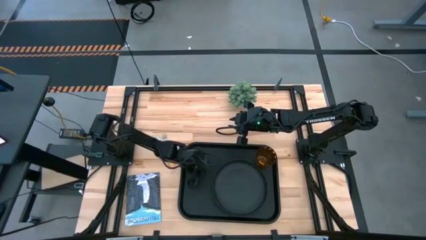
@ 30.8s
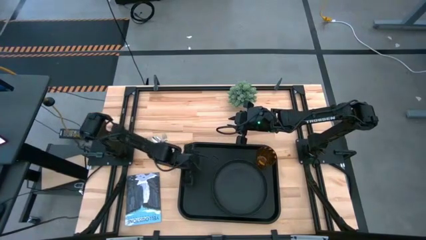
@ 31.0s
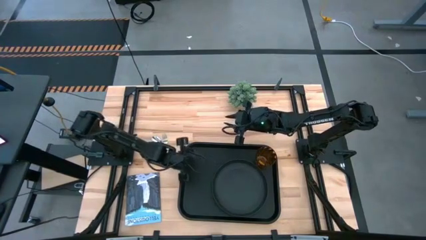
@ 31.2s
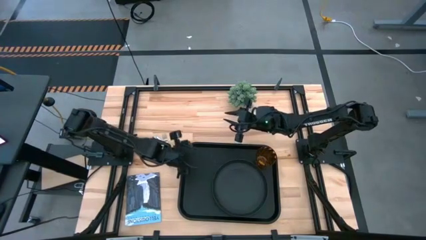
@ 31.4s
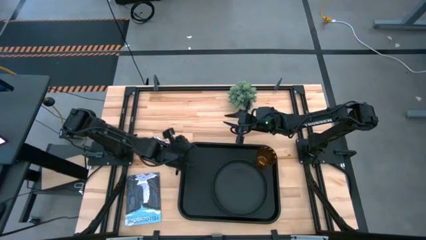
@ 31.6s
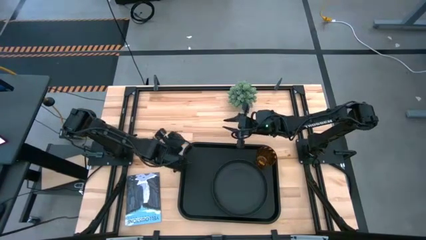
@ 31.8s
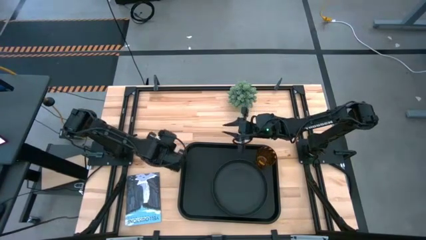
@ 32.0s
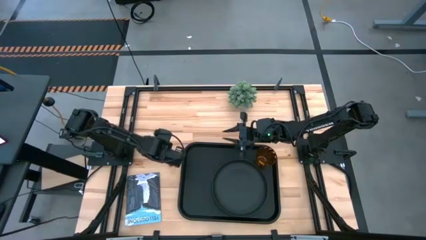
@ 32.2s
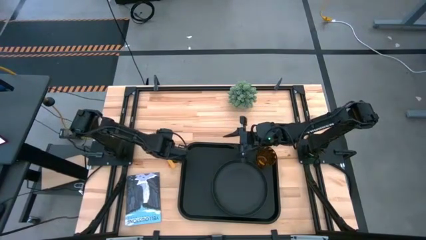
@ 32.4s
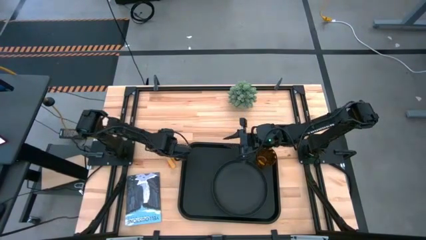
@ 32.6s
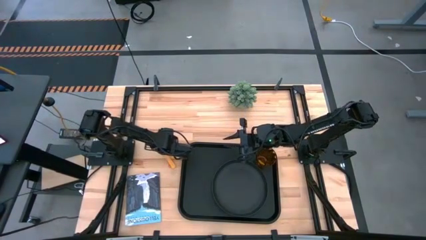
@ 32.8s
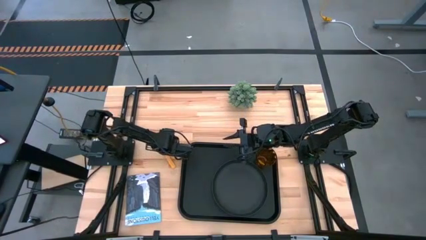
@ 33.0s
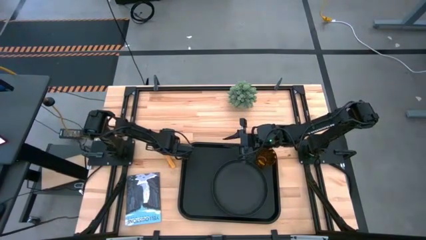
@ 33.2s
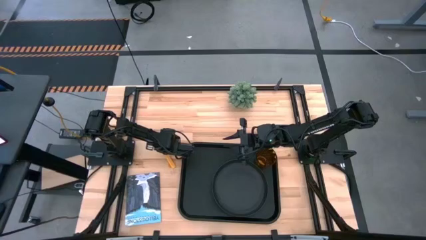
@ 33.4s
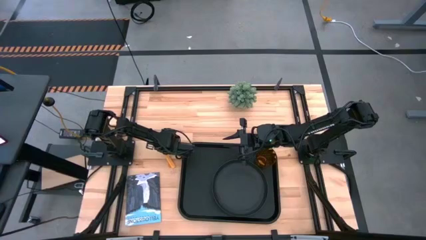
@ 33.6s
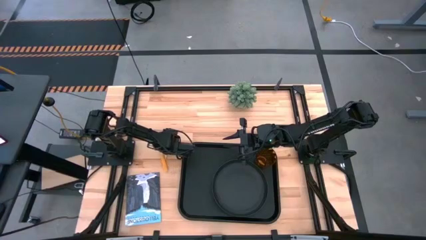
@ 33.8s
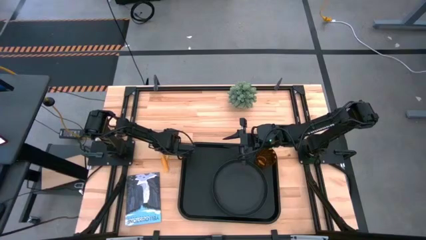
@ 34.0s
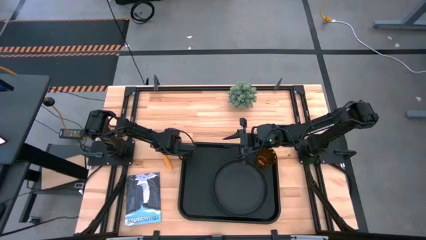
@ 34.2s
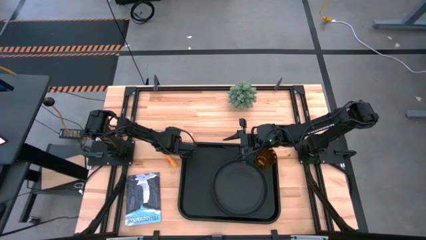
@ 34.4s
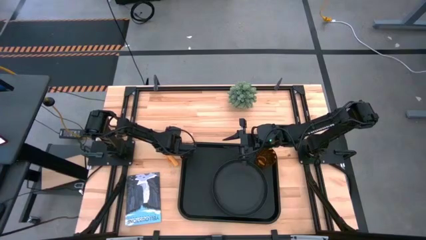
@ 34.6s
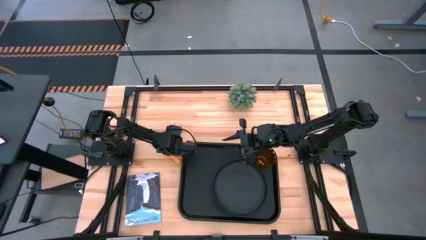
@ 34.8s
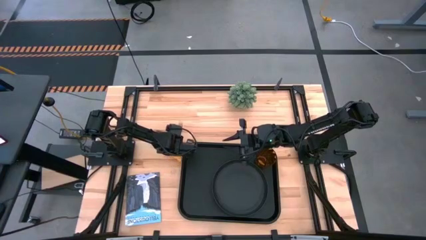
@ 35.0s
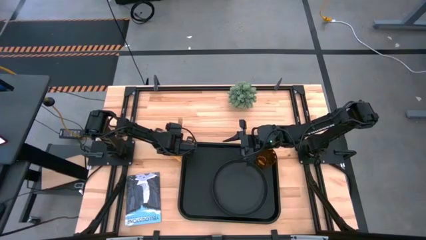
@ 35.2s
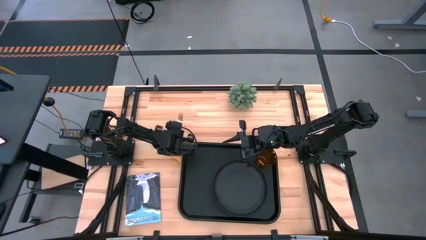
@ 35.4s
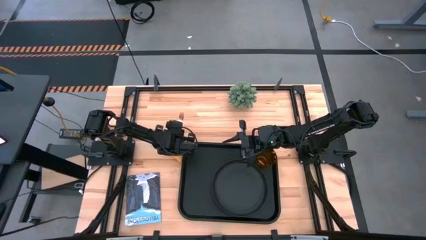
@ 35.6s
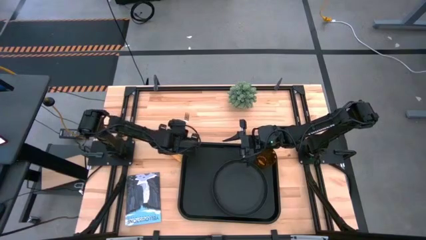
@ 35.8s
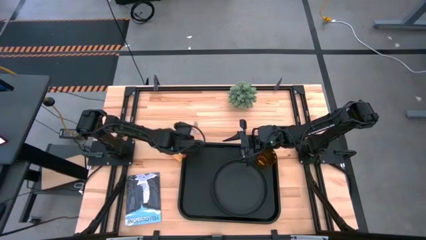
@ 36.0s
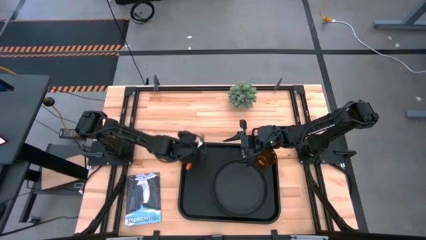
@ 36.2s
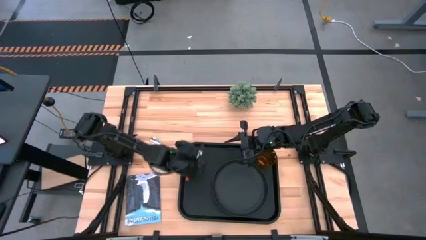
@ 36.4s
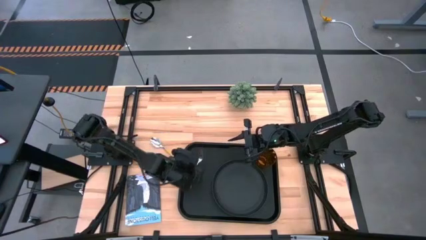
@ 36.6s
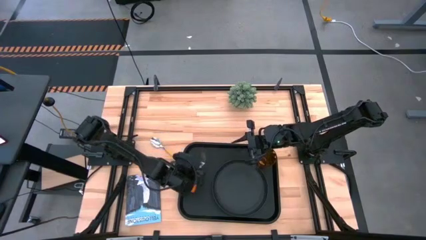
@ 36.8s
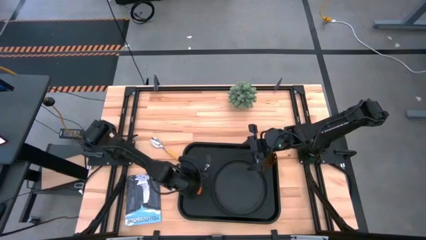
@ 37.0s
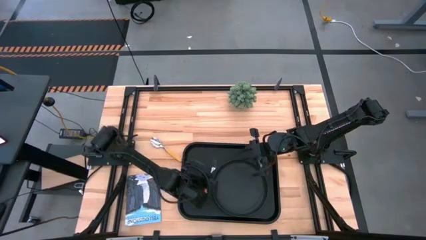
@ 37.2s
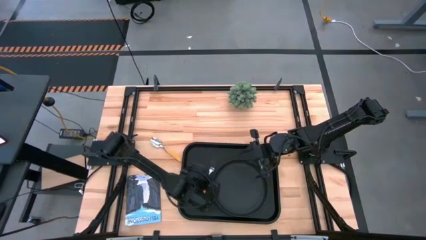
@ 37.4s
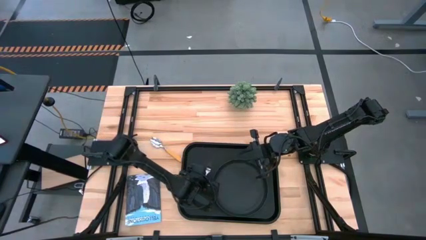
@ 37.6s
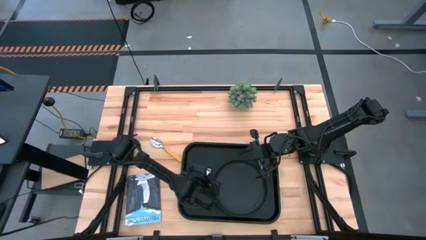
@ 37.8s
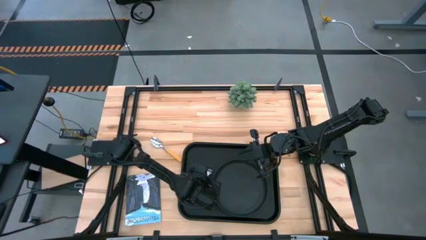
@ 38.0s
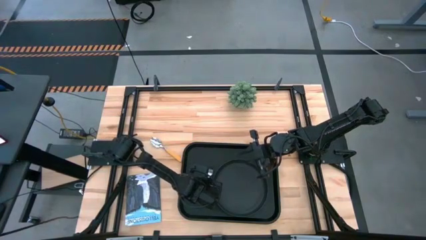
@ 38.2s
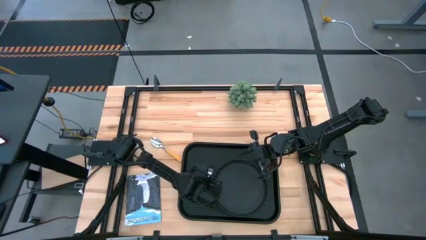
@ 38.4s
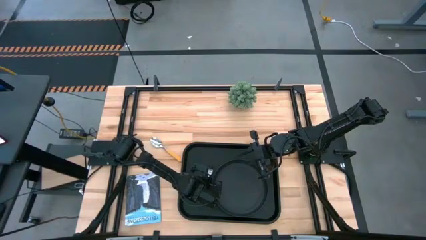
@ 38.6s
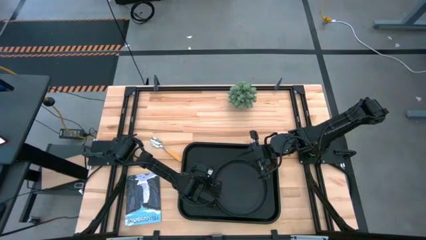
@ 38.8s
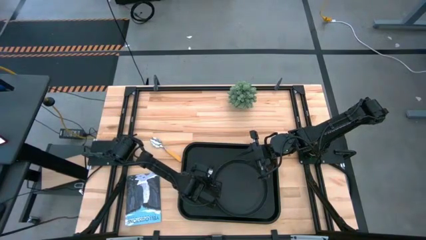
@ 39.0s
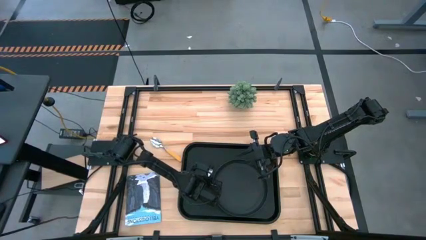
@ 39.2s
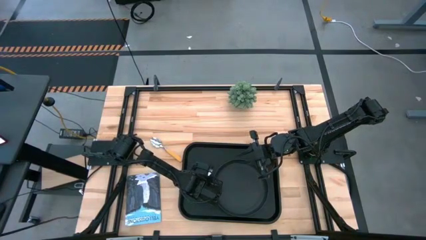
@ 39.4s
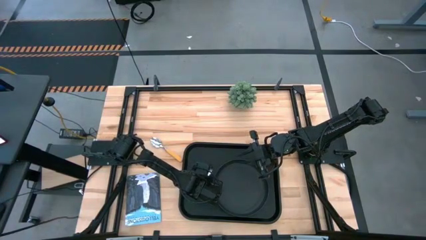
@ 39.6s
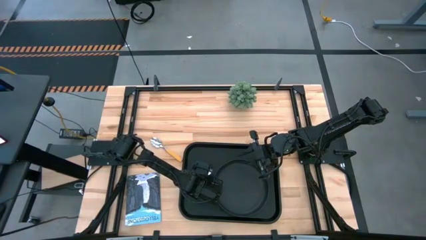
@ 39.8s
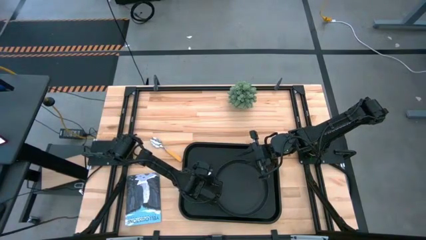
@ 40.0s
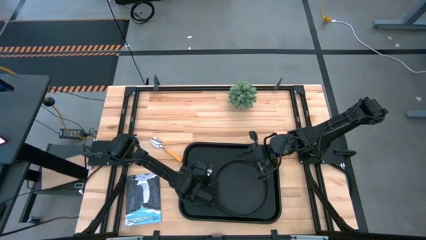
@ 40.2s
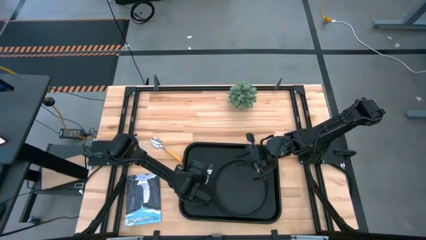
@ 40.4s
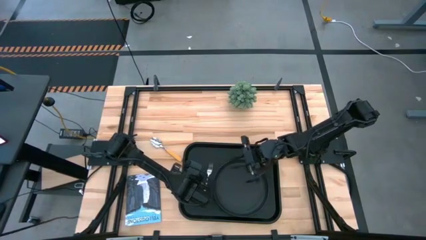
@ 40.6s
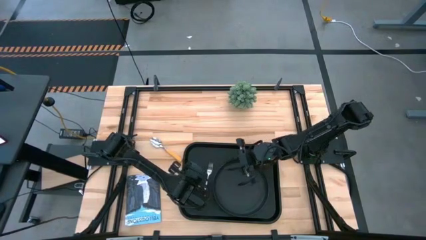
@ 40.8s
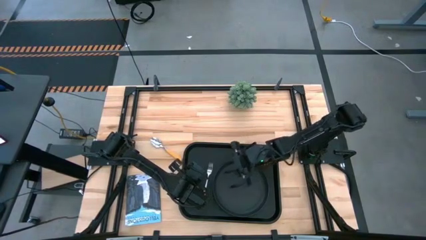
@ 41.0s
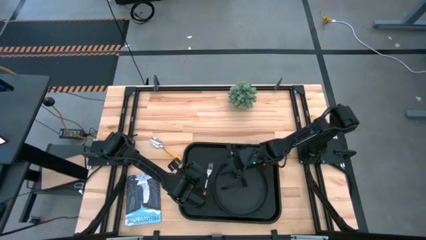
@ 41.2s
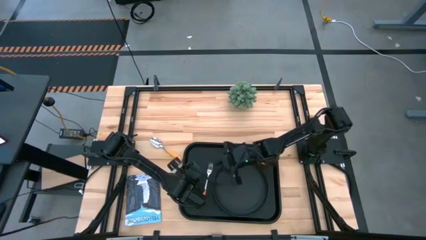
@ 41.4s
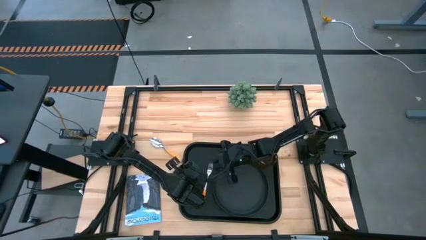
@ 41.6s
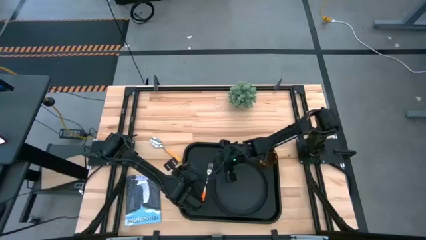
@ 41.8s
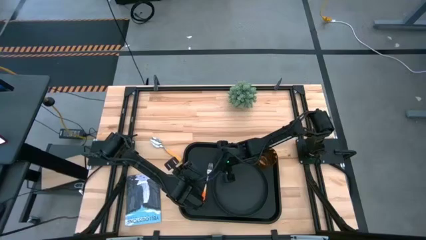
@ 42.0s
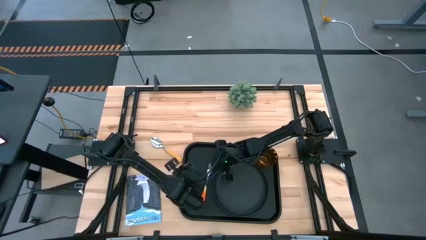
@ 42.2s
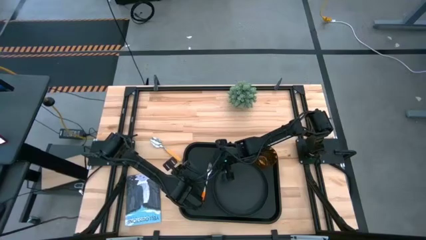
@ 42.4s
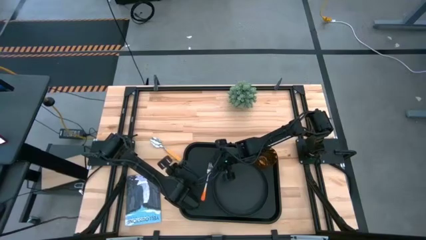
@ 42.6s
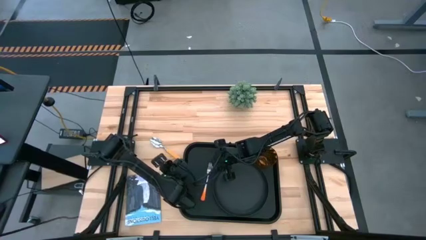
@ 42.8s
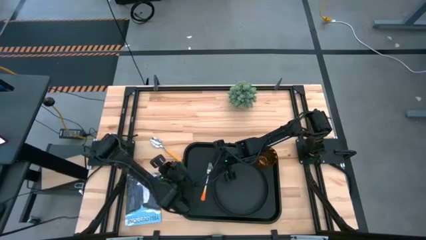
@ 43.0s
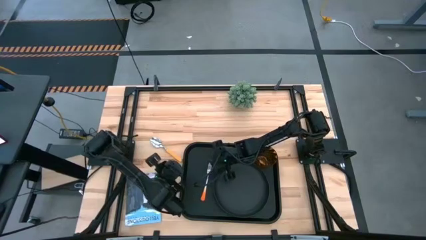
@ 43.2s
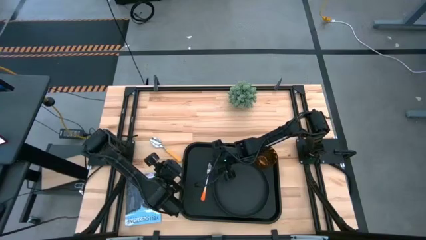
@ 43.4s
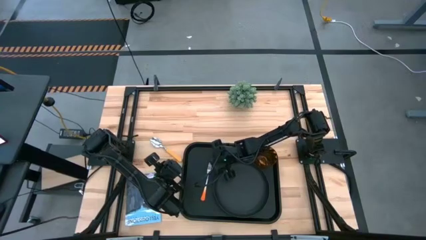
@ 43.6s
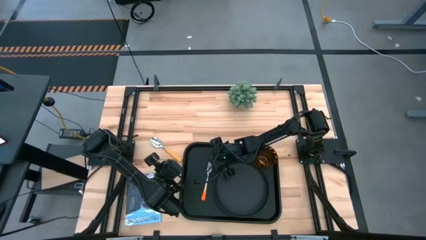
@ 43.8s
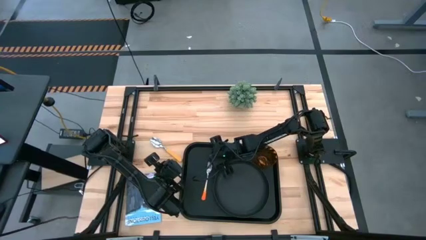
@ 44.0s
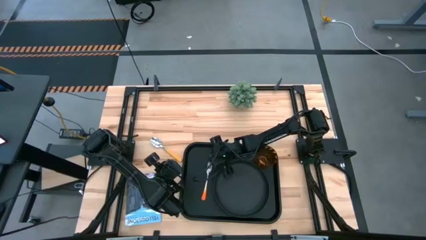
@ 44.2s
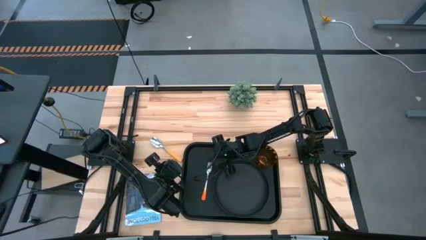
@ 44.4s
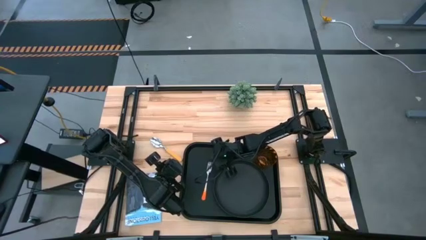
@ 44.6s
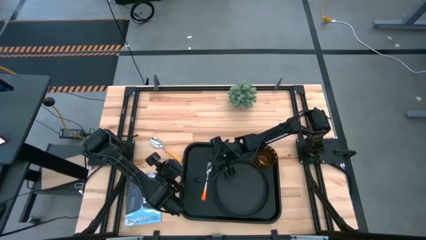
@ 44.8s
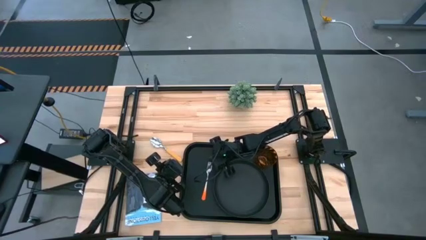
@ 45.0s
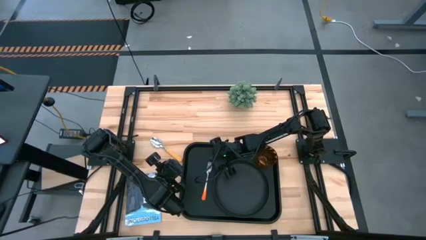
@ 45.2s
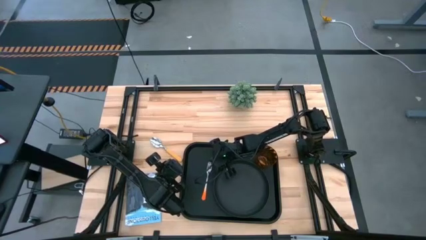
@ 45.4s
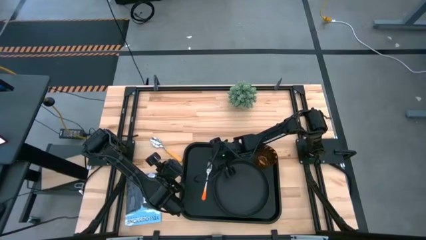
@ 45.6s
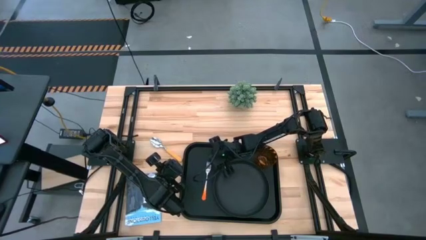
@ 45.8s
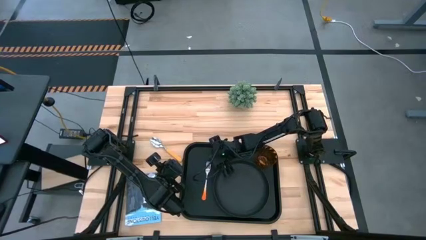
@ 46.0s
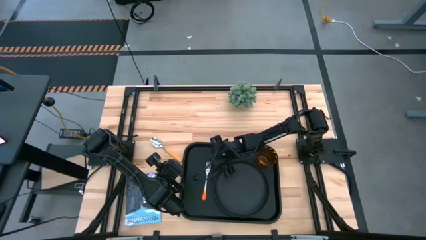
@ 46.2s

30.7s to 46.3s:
Task: Pick and place plate/cup/fork/spoon on tray
Put the orange fork on the black tray to the left of the black plate
